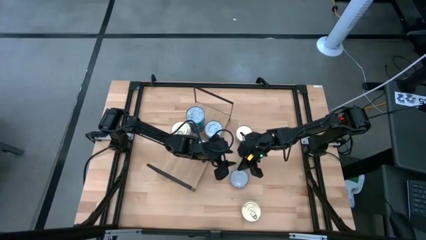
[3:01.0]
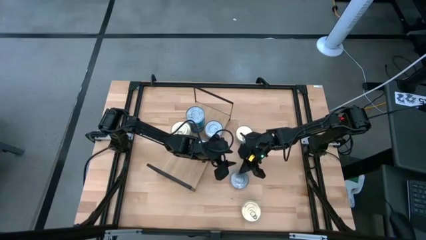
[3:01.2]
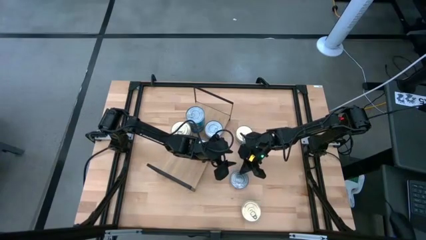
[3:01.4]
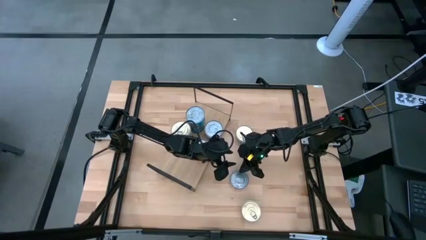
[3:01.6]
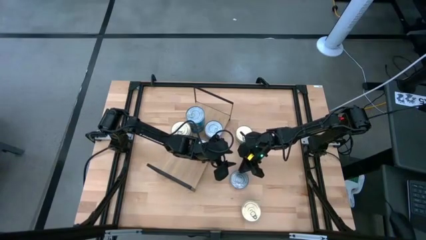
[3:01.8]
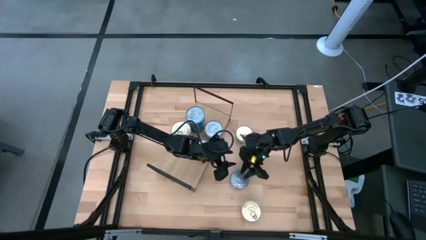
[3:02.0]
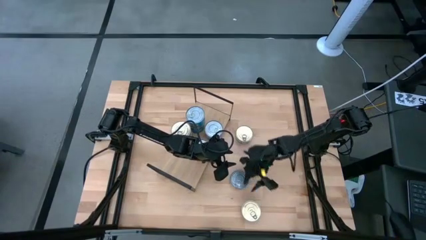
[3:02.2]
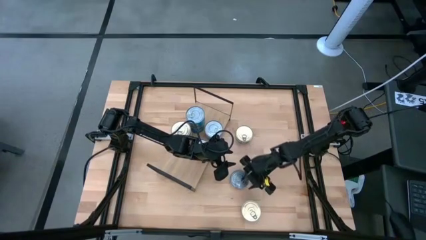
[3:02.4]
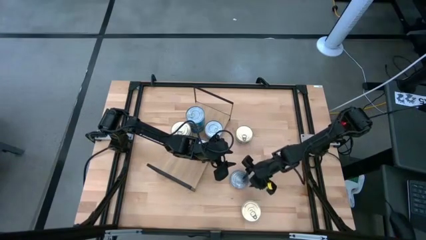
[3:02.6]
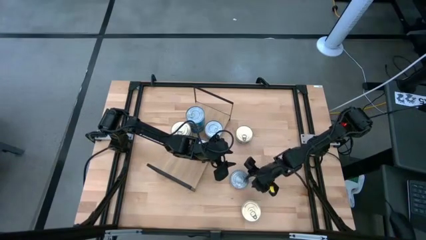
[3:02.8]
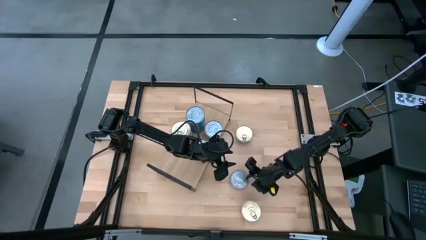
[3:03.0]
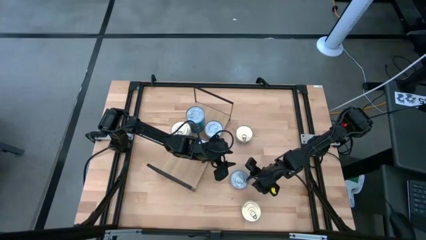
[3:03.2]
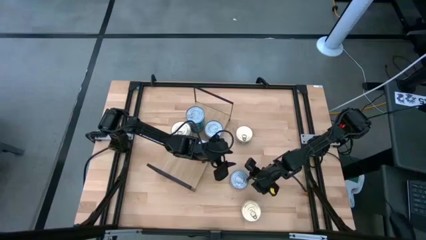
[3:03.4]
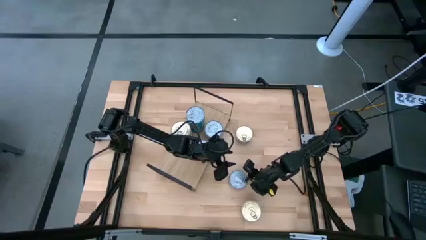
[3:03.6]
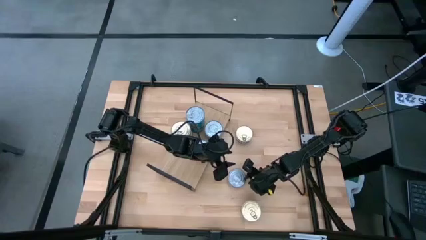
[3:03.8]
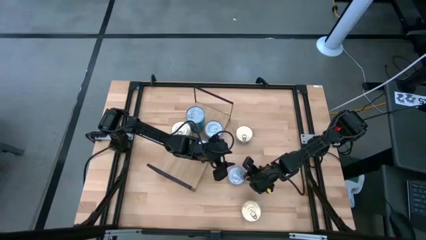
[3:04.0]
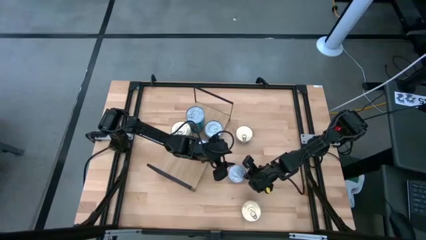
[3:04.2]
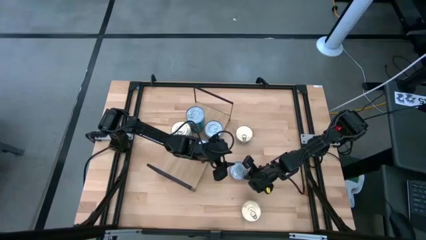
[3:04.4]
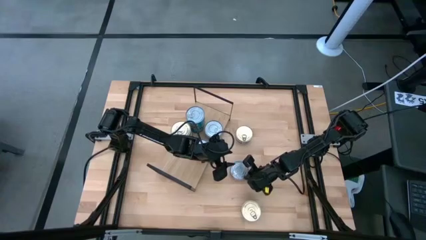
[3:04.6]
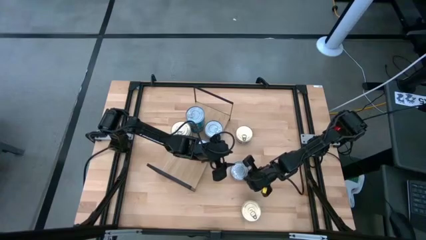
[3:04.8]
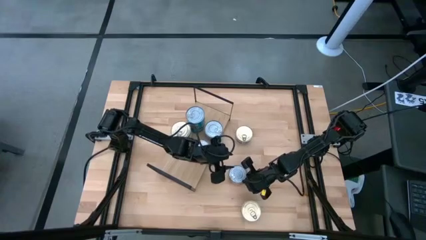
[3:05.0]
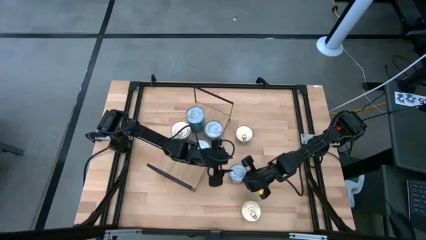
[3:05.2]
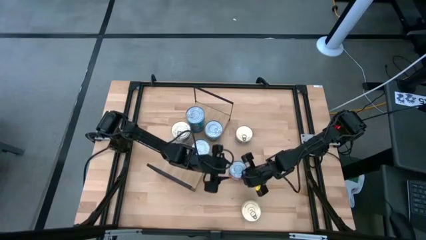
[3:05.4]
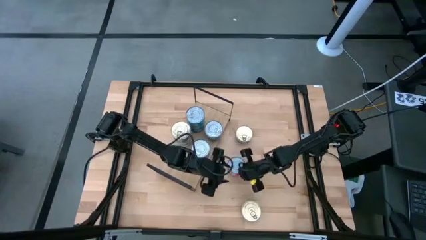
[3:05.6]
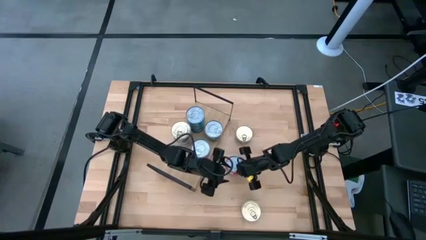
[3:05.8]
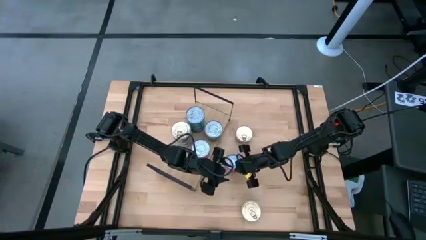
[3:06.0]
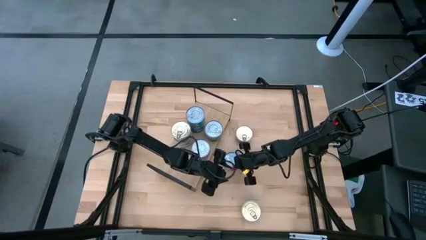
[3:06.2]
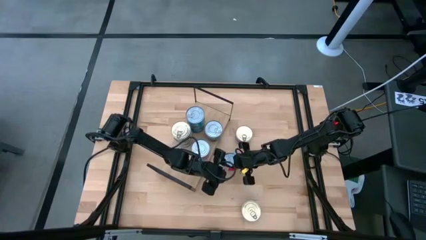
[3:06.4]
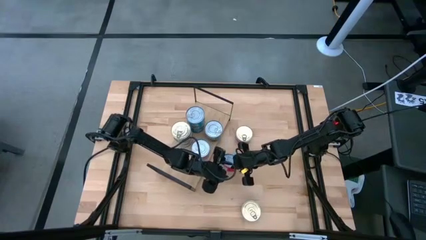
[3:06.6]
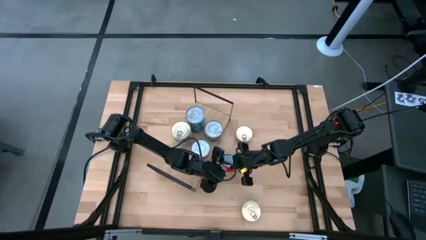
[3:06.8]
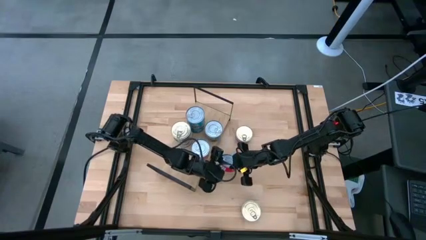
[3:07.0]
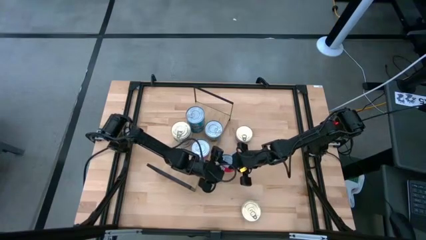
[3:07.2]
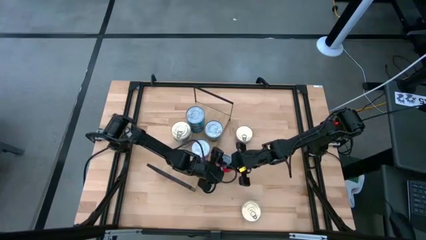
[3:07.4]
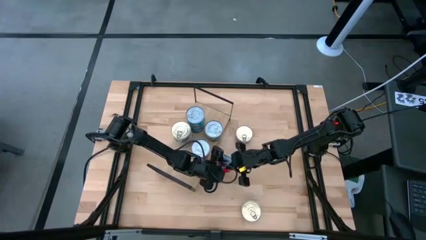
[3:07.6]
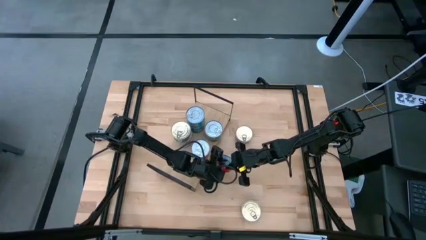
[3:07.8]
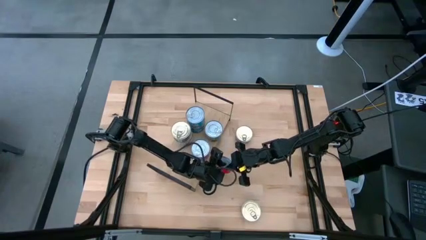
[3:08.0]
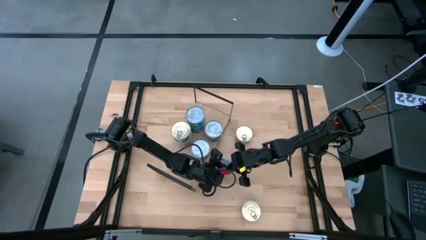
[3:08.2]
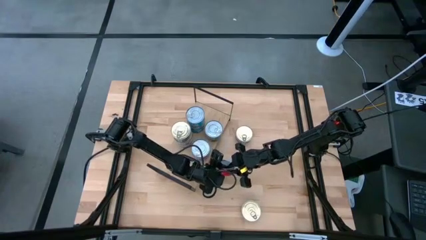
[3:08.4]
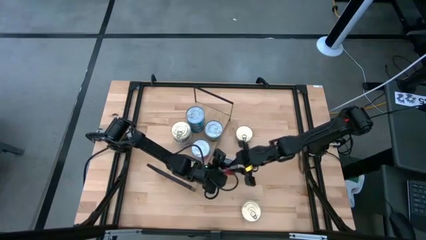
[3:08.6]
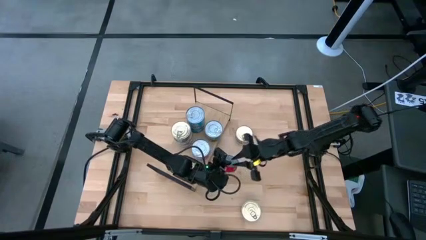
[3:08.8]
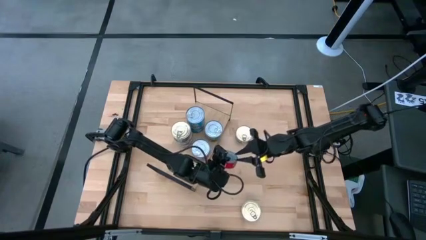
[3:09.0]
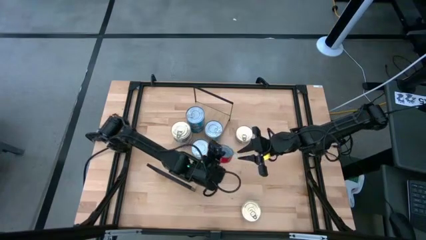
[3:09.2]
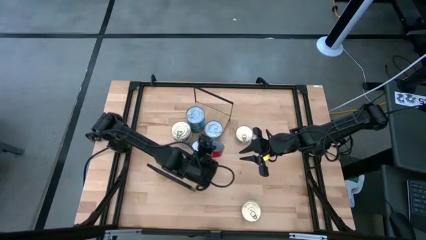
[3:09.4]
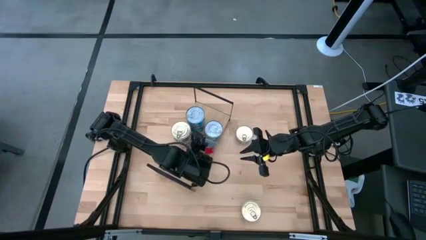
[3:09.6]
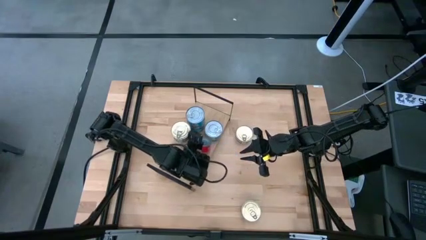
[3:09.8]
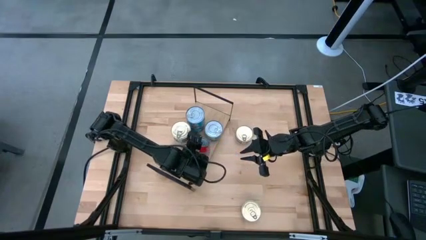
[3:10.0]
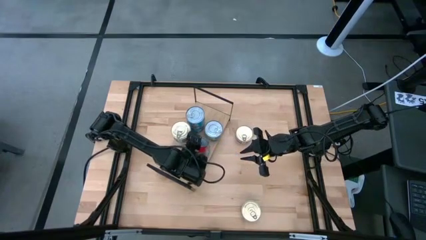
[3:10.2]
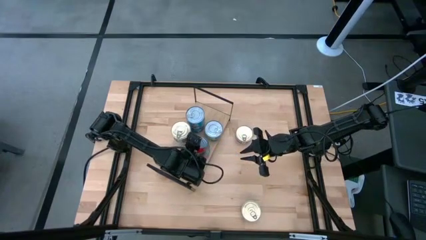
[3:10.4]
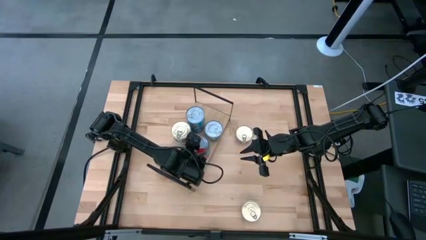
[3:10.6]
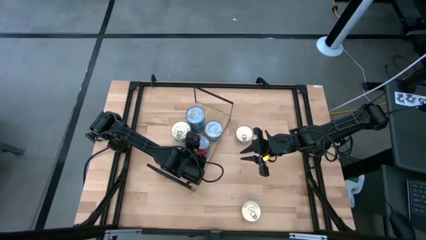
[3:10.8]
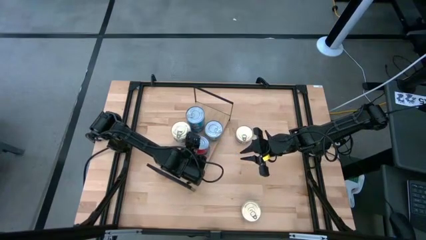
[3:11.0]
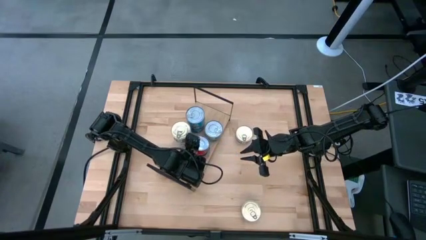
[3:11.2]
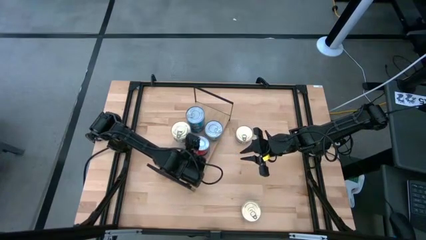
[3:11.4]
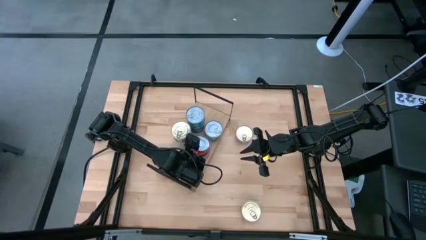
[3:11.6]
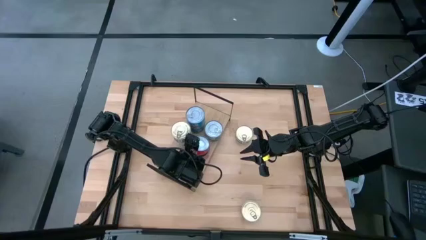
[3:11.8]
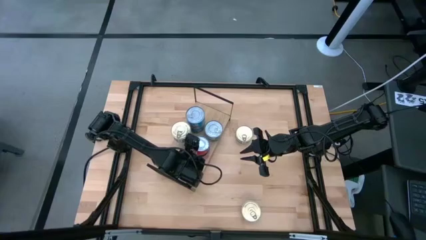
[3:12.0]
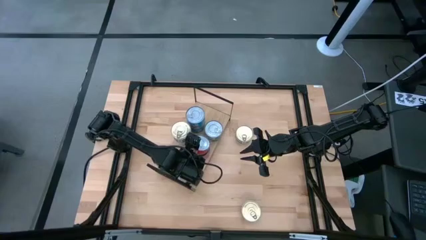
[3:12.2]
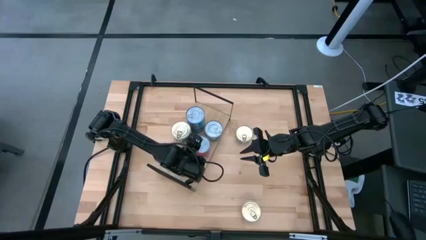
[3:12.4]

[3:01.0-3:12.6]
Task: Stack canned seafood by type on shelf
Stack the red tuna can on top of the red tuna can on the shelf

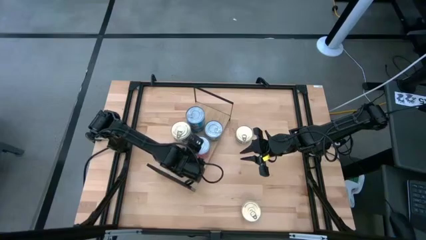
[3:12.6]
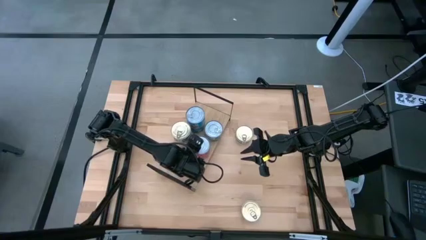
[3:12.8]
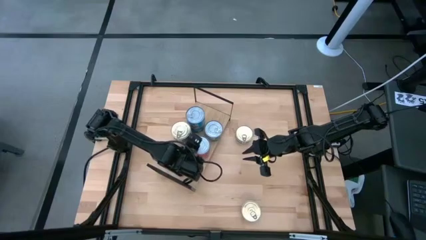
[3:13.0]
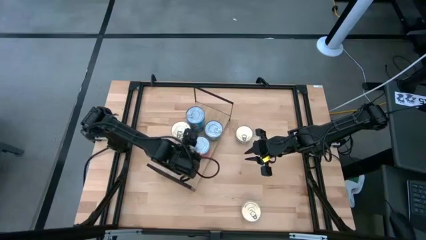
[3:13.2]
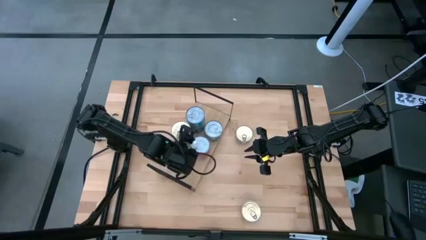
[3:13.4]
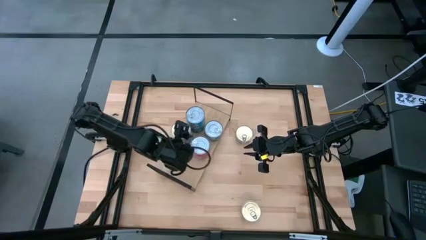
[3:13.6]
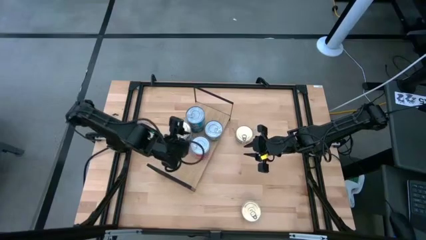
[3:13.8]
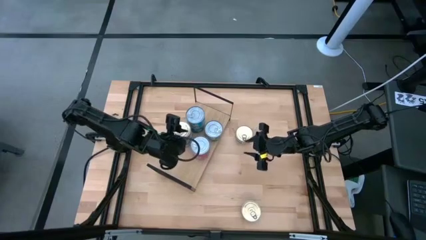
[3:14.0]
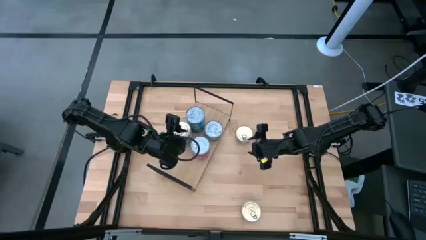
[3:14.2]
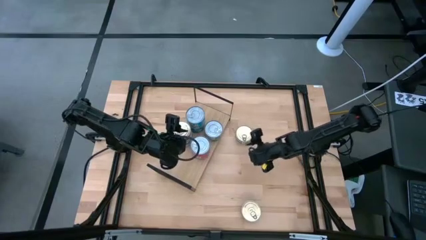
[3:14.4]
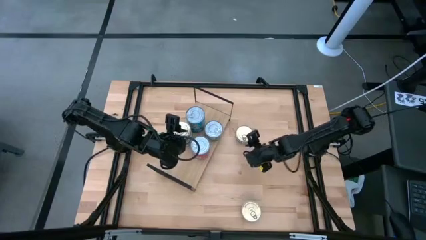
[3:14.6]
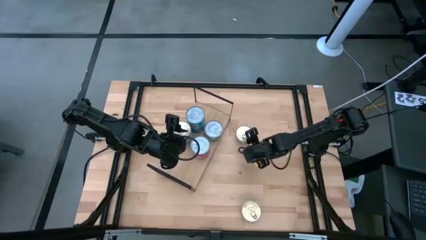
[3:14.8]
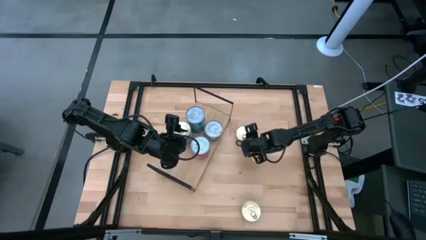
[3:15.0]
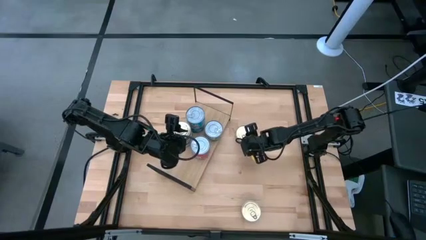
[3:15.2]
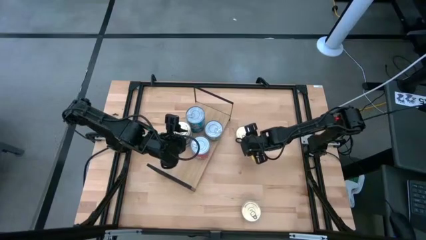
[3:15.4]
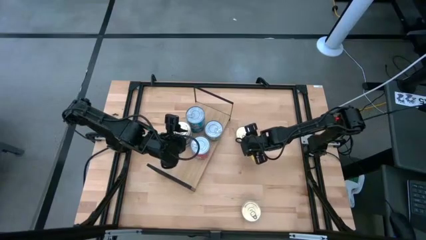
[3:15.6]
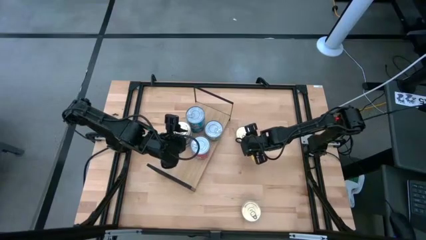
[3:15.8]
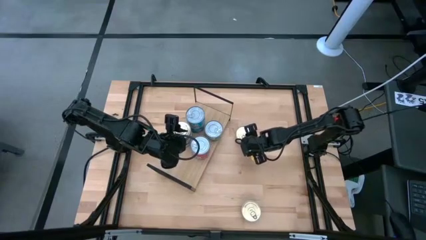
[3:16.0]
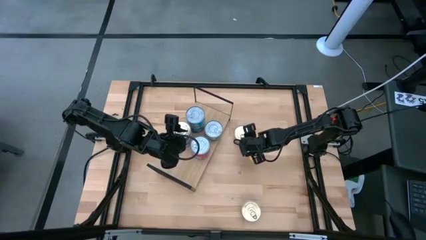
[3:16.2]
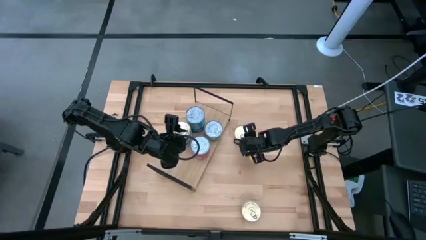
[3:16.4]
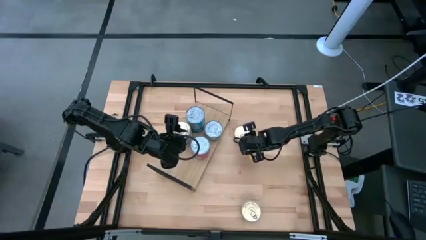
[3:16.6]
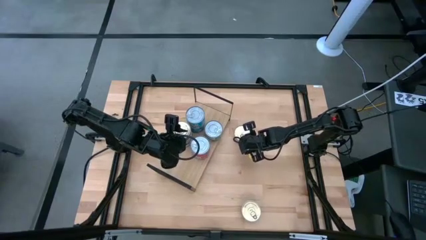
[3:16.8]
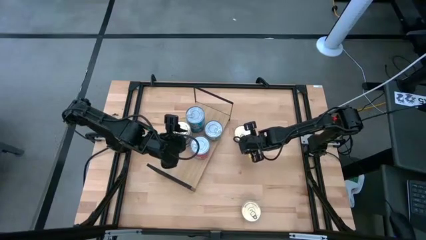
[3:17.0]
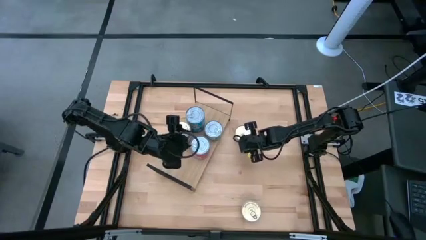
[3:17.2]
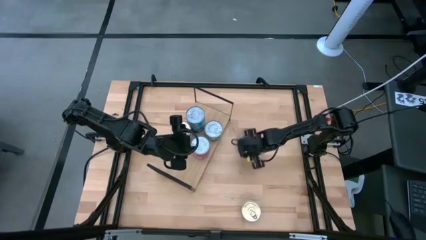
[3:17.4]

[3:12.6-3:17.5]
Stack the blue tuna can on top of the blue tuna can on the shelf
